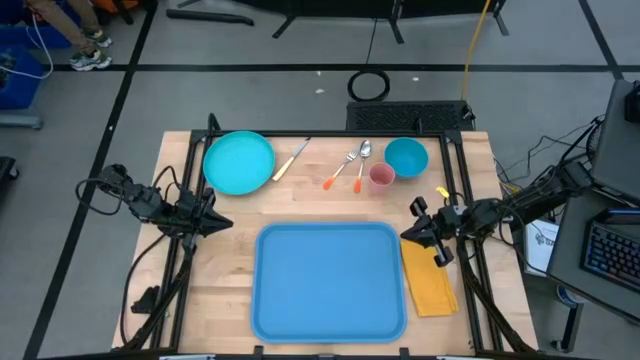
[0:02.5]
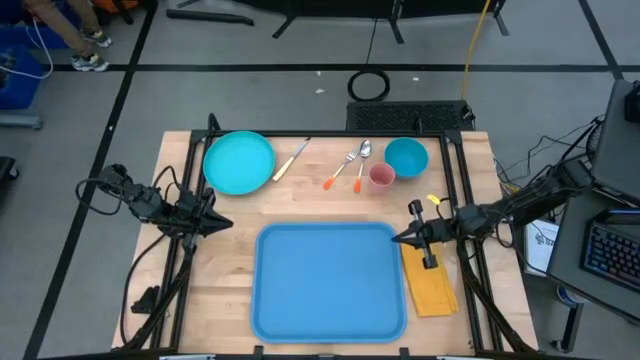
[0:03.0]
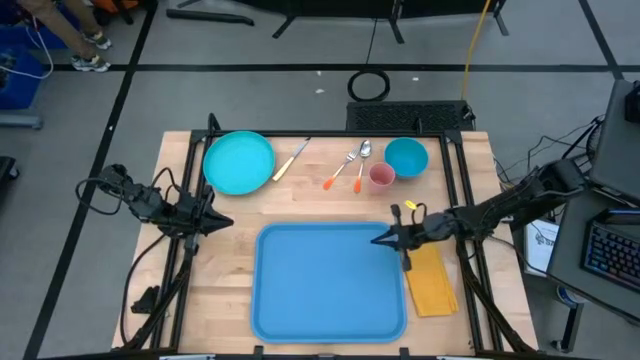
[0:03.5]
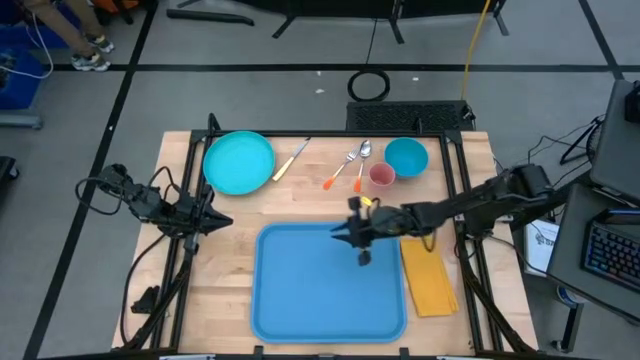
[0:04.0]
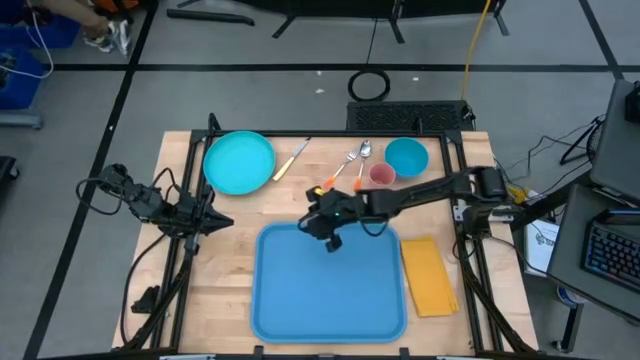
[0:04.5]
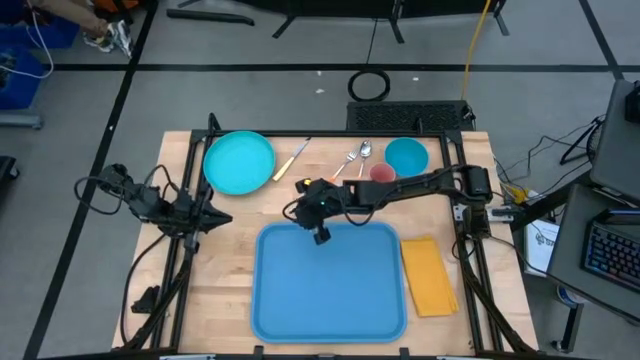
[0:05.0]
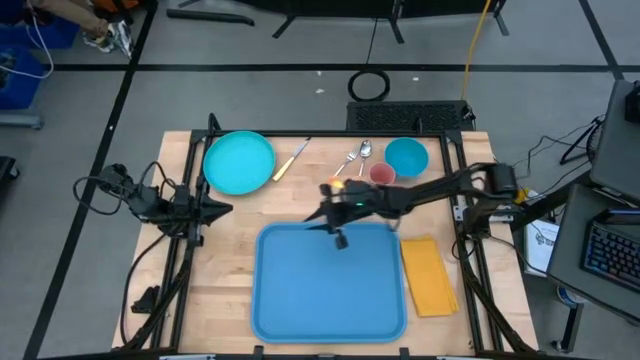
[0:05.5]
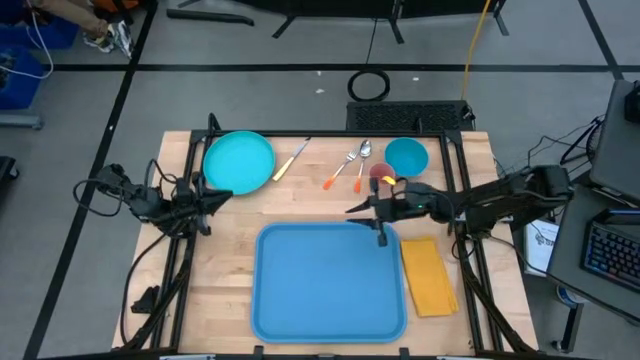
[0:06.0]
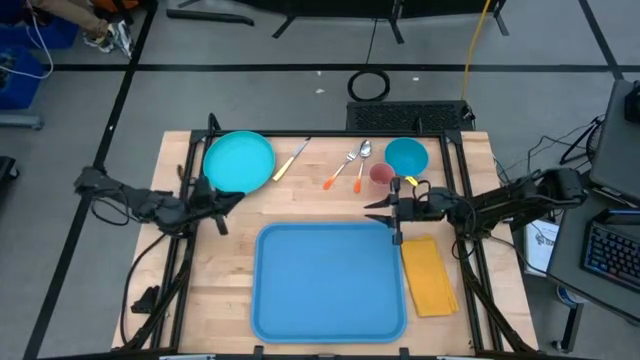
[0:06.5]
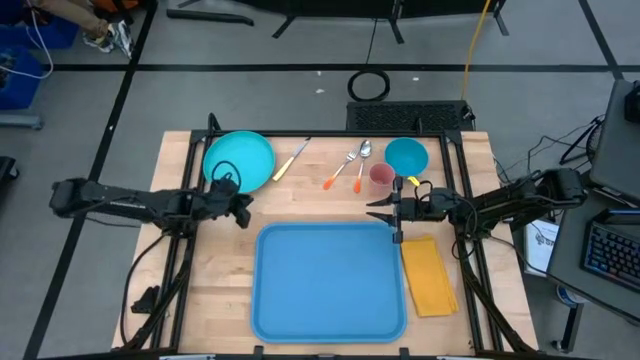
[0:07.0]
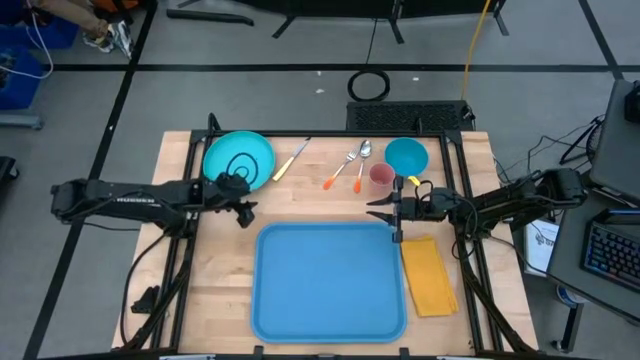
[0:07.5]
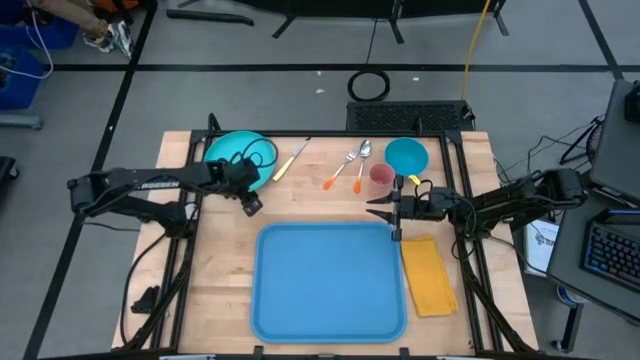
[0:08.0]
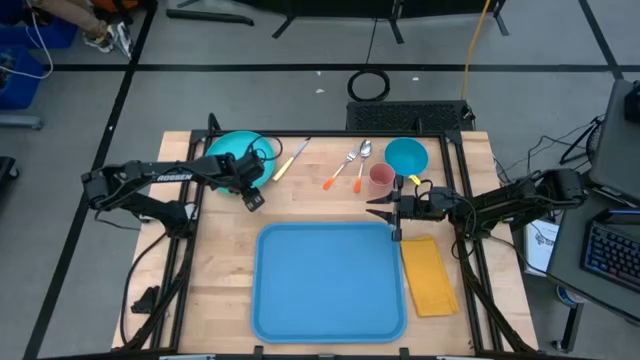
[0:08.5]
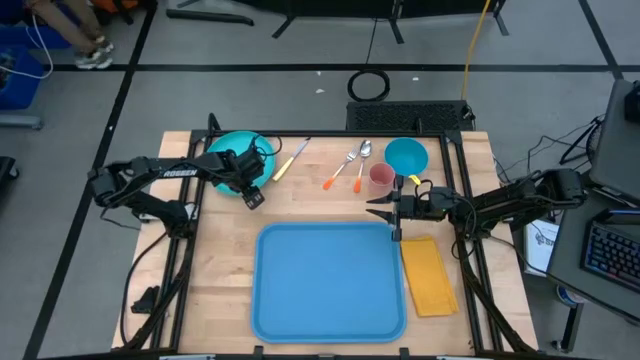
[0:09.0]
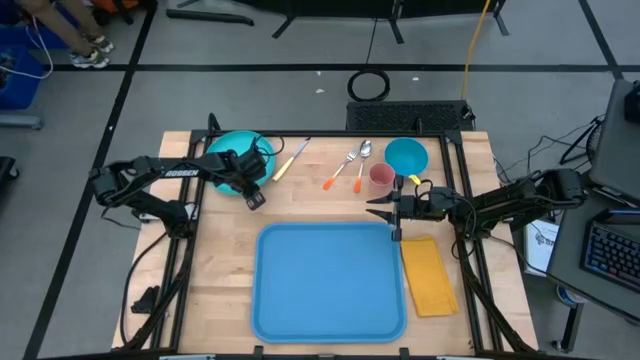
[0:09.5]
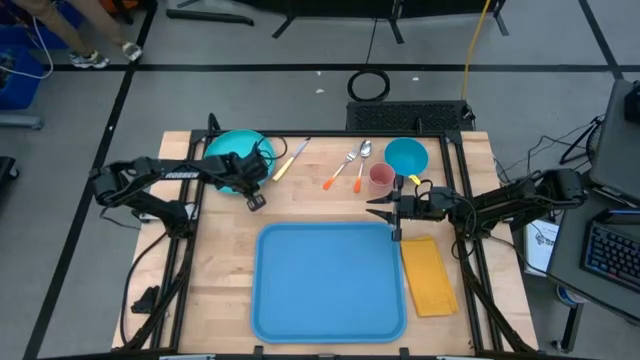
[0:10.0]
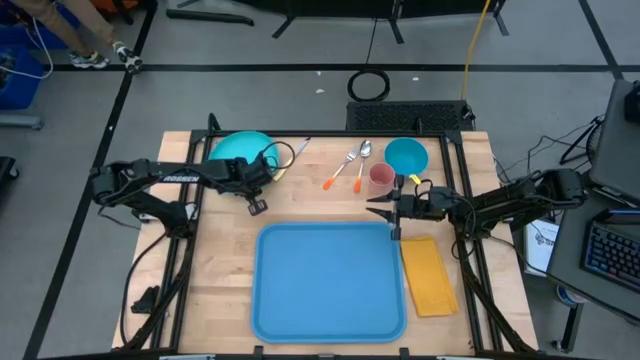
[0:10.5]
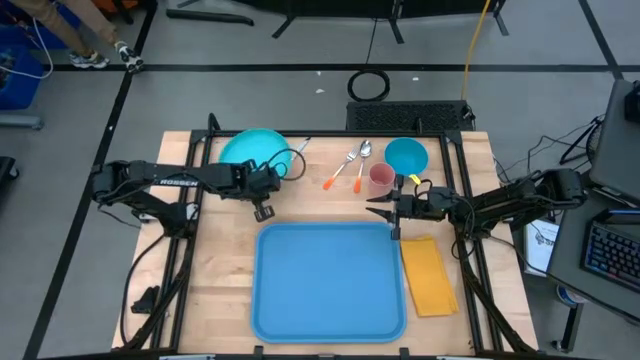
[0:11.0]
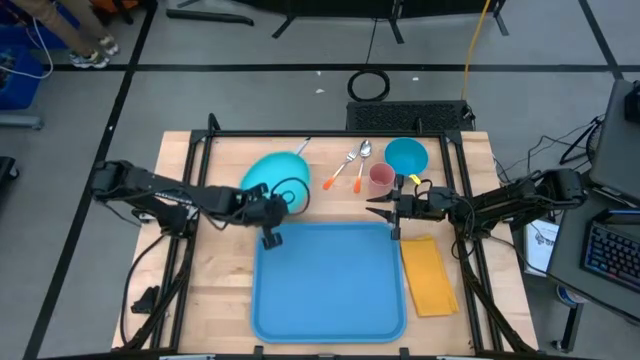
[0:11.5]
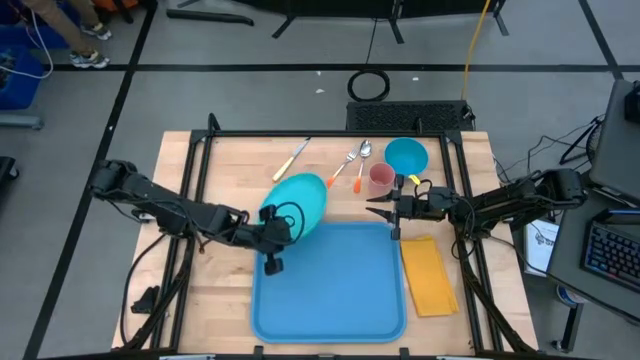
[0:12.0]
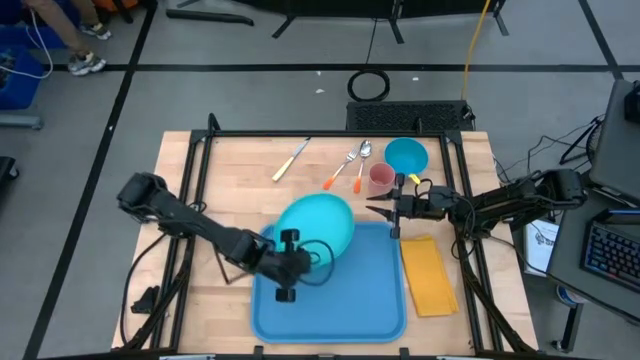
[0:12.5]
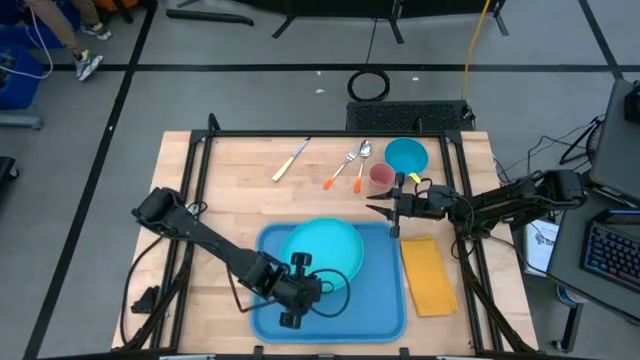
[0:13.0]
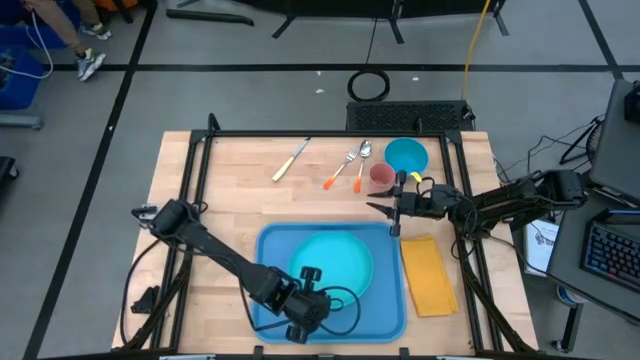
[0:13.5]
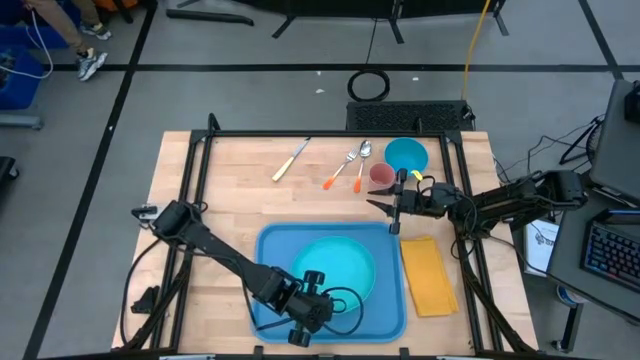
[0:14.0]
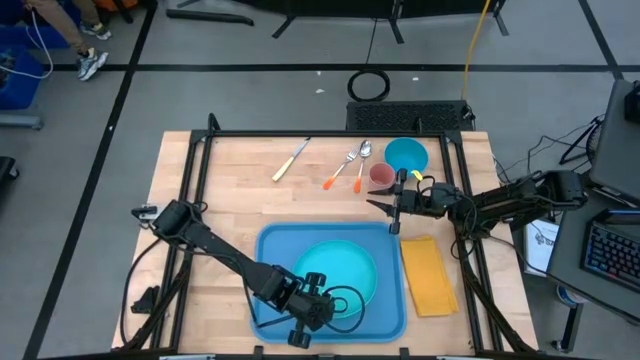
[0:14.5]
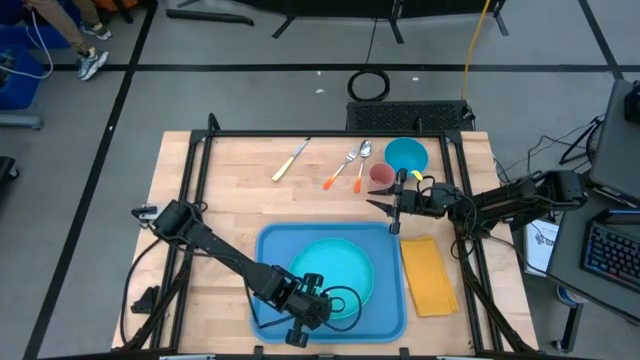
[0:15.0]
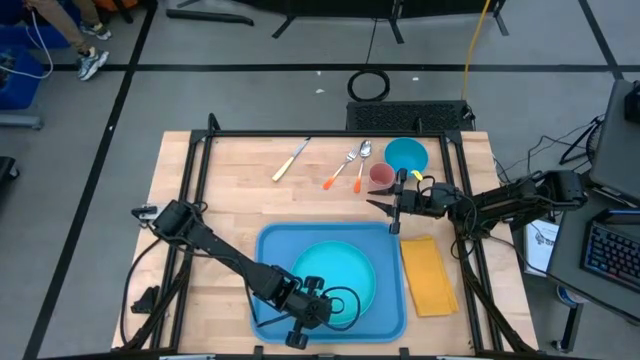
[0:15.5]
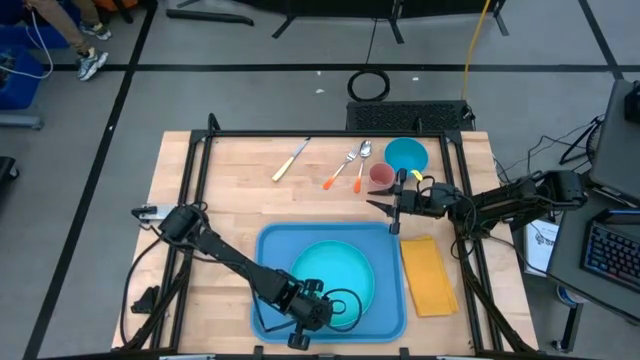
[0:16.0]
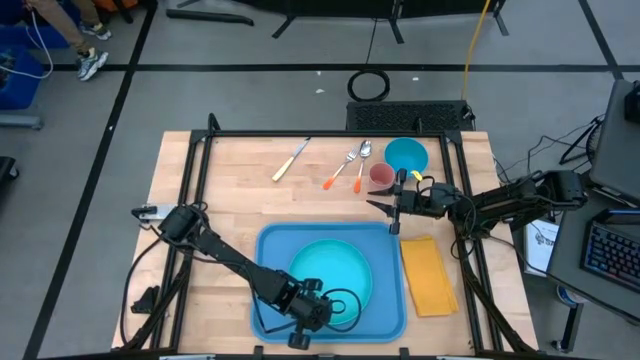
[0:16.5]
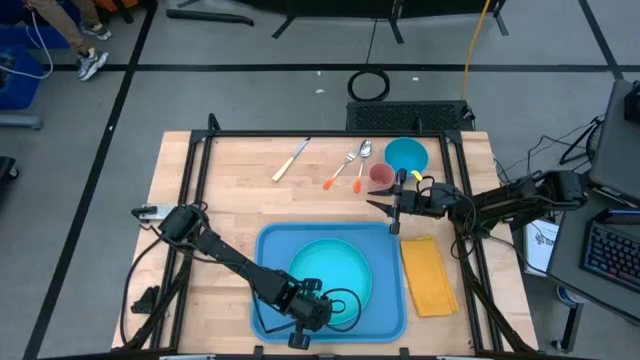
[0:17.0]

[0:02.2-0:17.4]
Task: Set up tray
Put the light blue plate on the blue tray

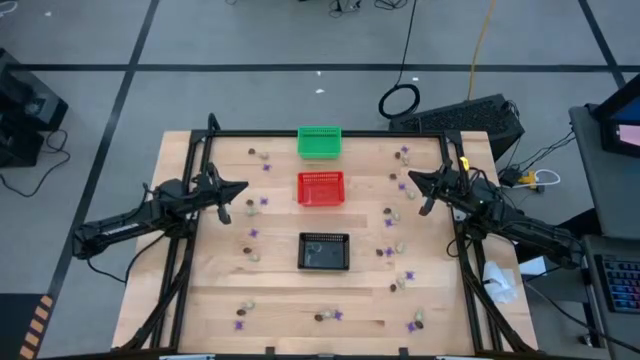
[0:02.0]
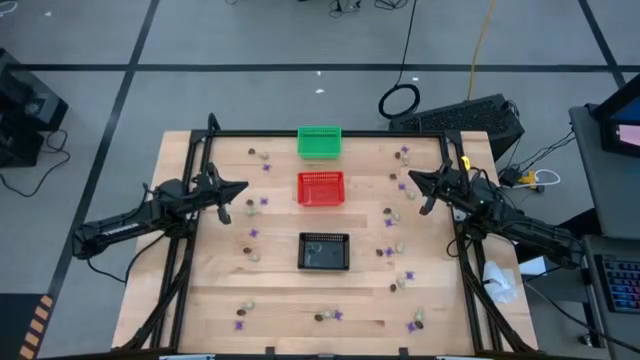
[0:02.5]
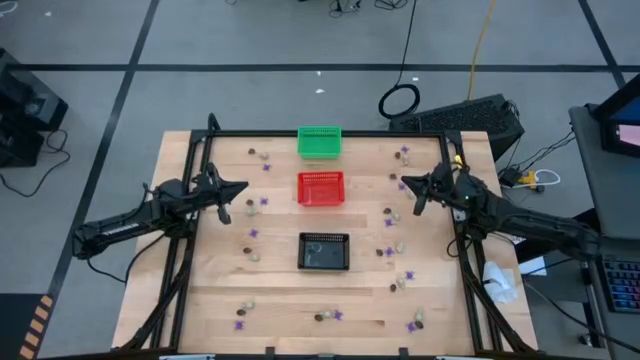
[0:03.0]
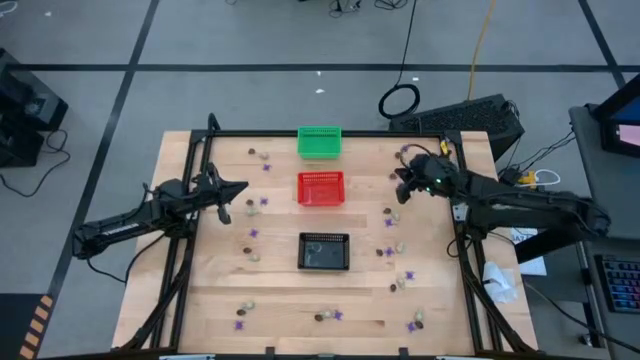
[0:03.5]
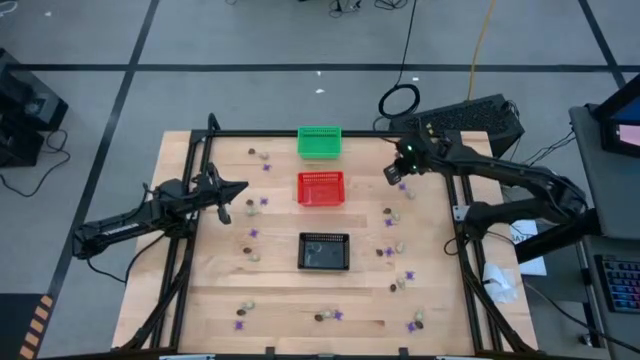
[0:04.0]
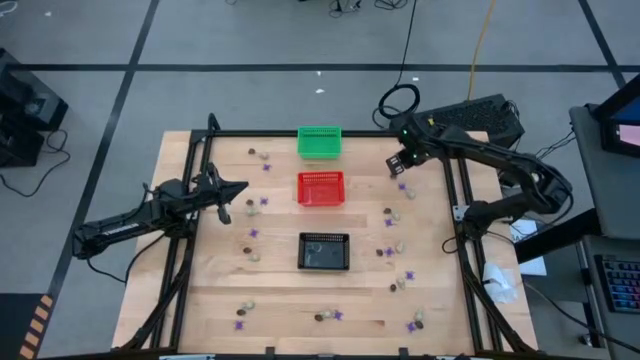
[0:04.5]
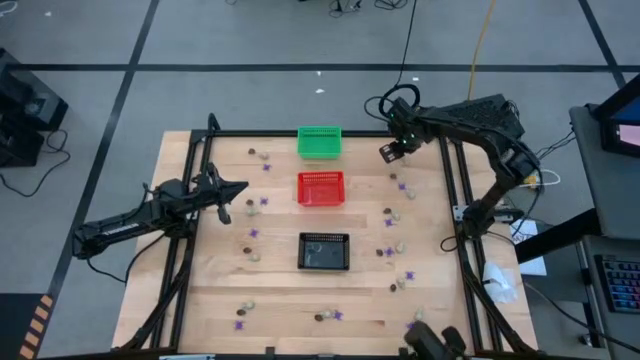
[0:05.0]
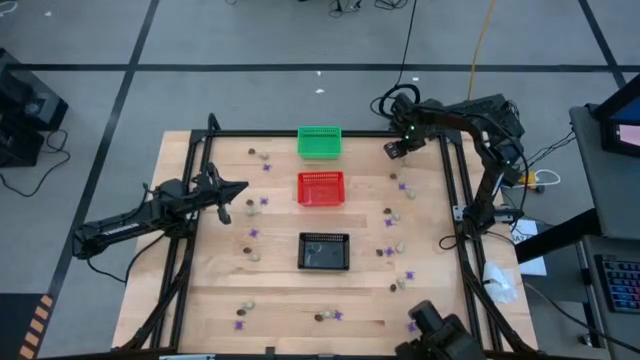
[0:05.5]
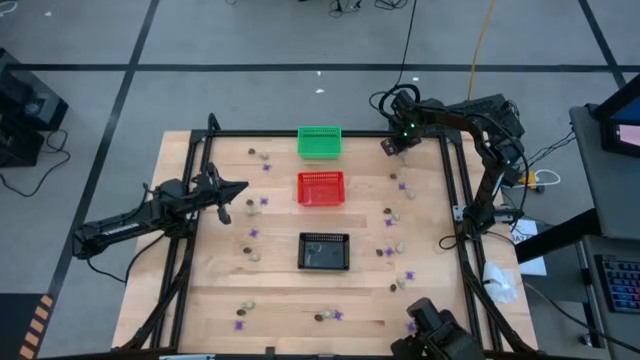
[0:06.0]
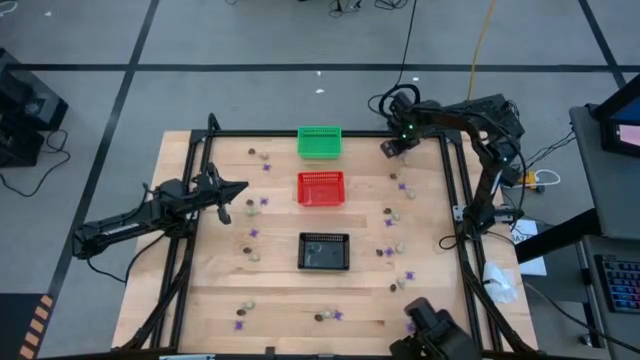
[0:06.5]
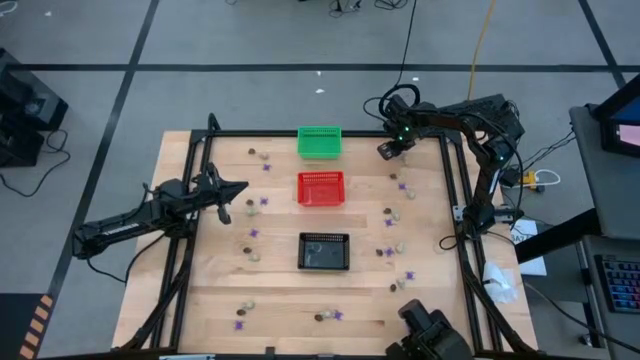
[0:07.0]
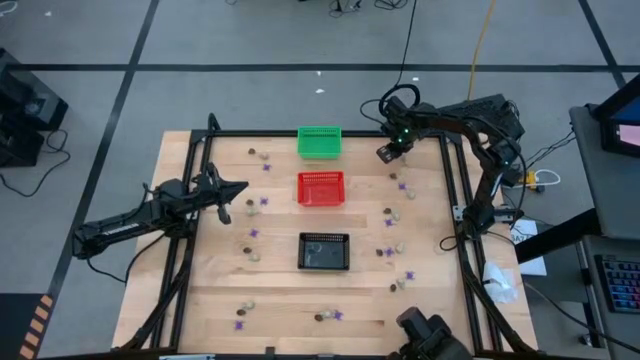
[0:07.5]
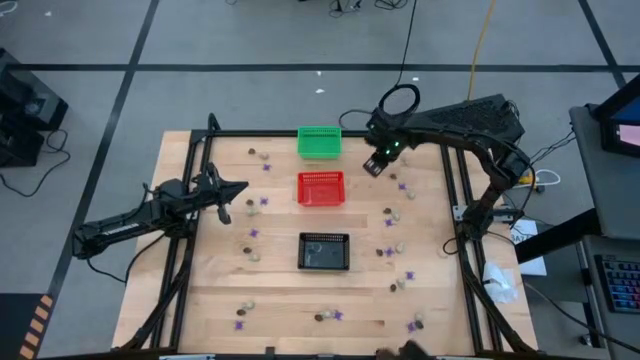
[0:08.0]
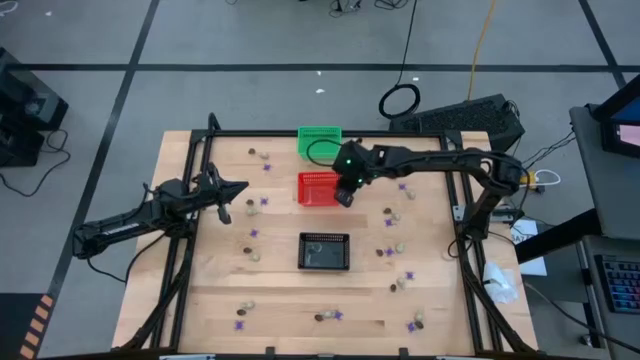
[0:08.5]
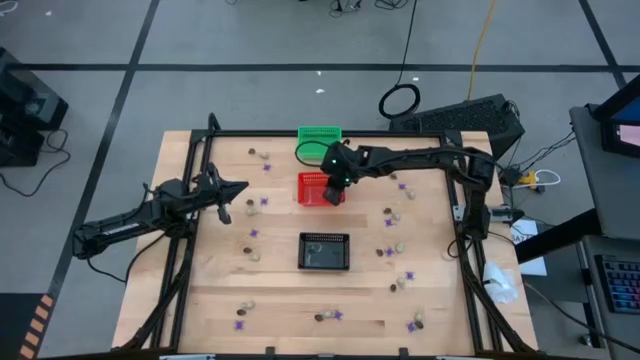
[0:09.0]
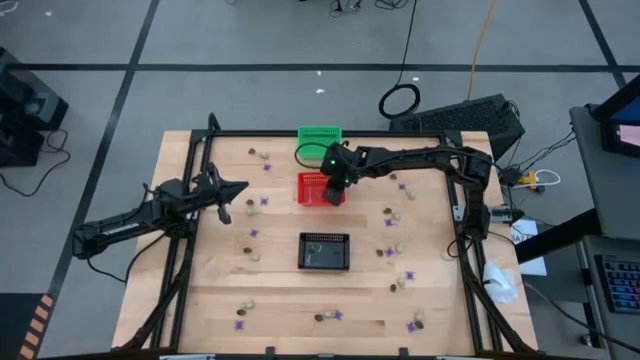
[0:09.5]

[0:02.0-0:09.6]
Task: Sort Halloween decoration
Put the black skull toy into the red basket
